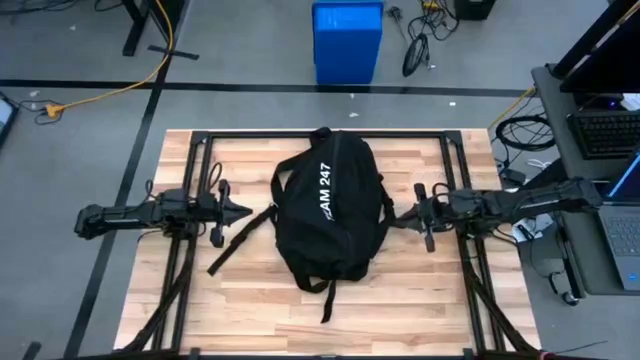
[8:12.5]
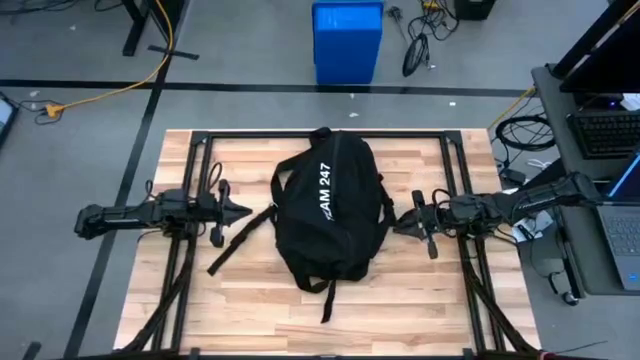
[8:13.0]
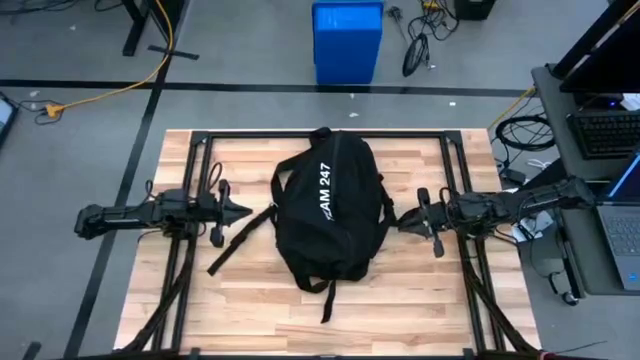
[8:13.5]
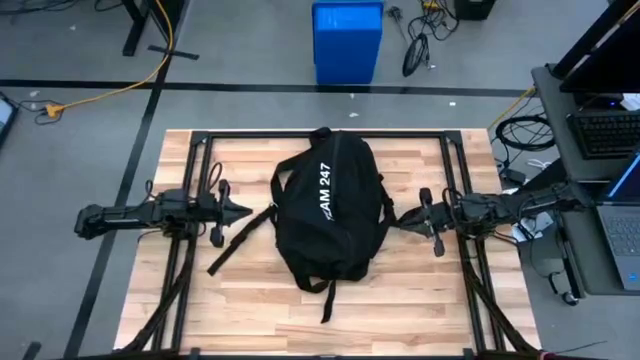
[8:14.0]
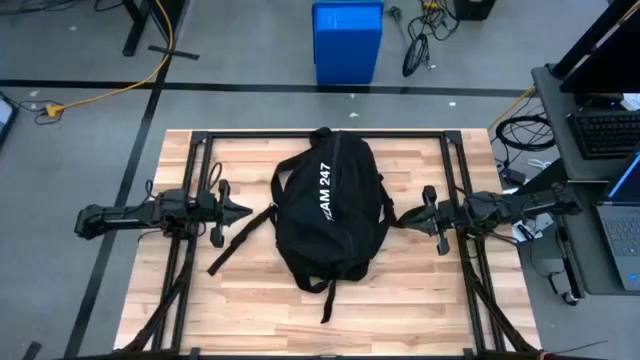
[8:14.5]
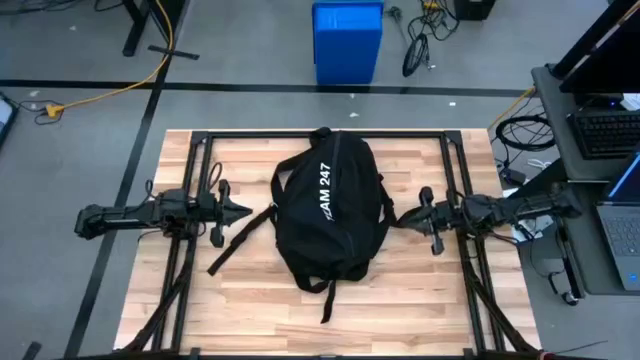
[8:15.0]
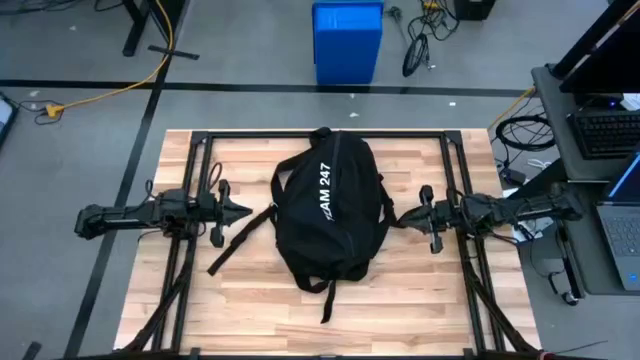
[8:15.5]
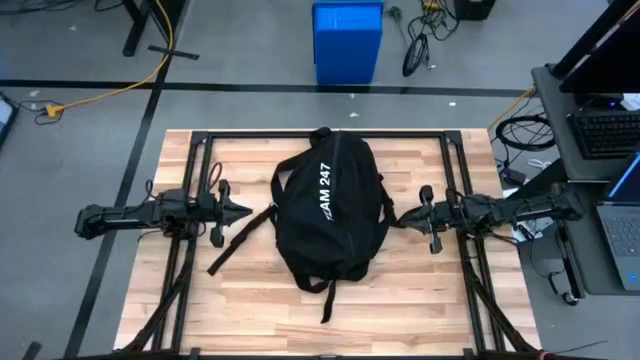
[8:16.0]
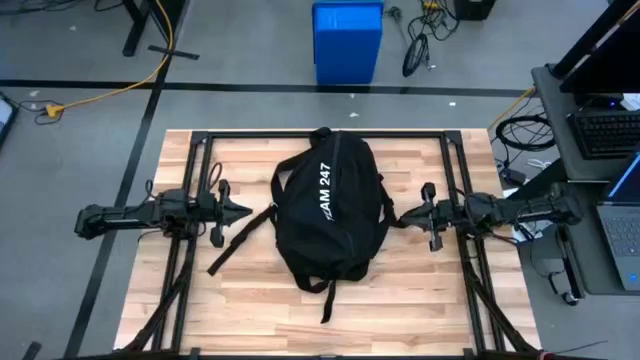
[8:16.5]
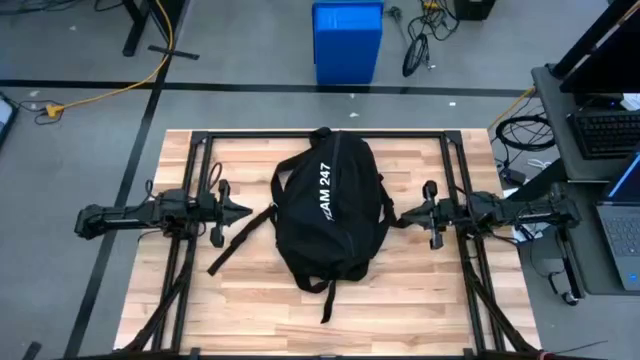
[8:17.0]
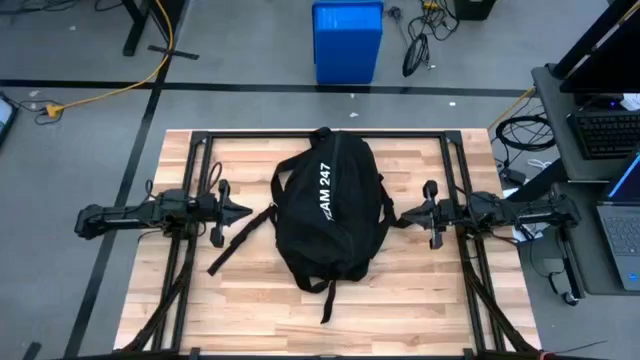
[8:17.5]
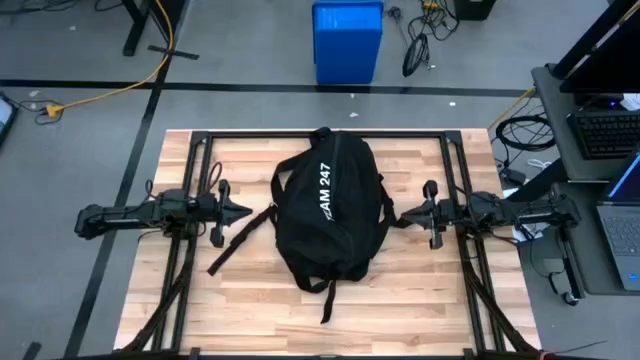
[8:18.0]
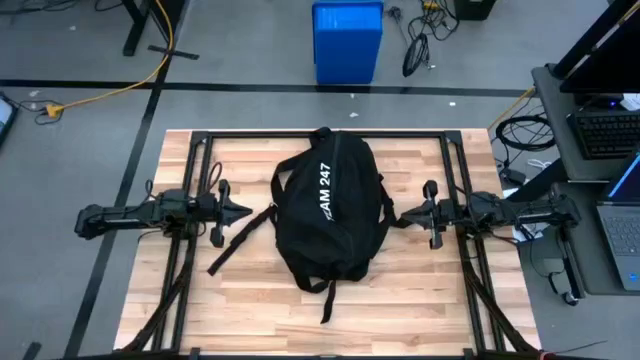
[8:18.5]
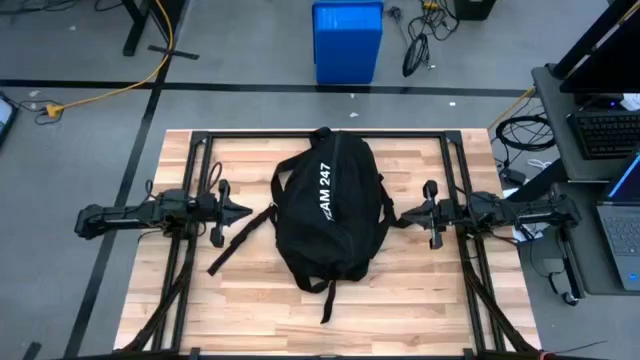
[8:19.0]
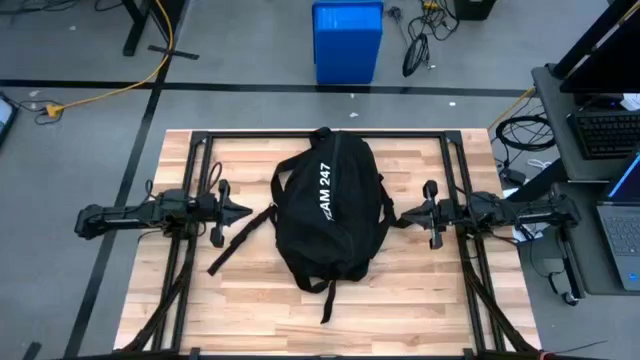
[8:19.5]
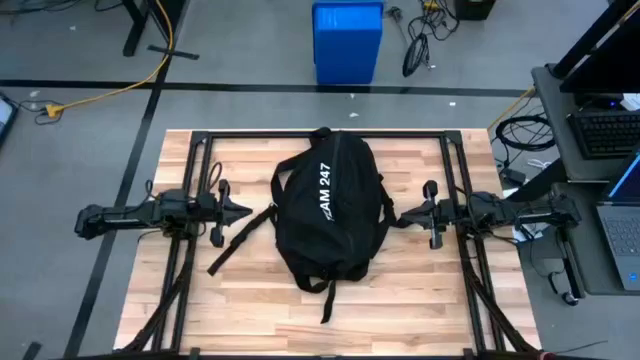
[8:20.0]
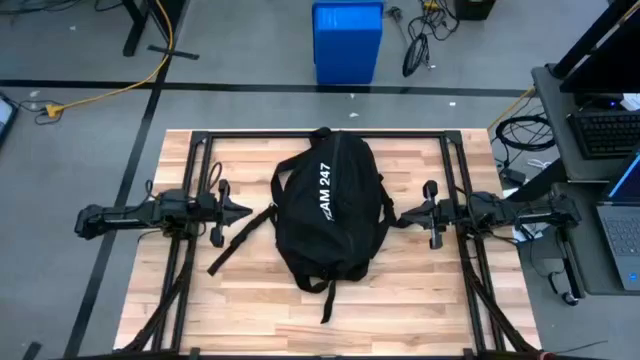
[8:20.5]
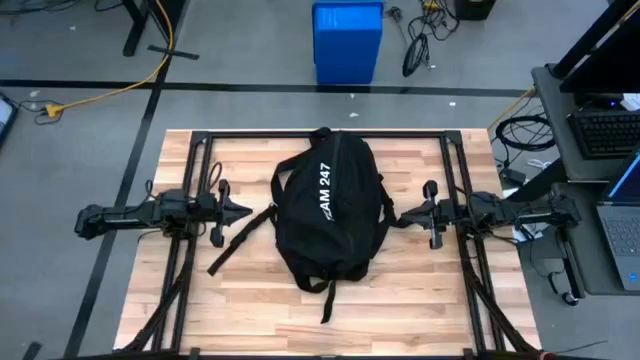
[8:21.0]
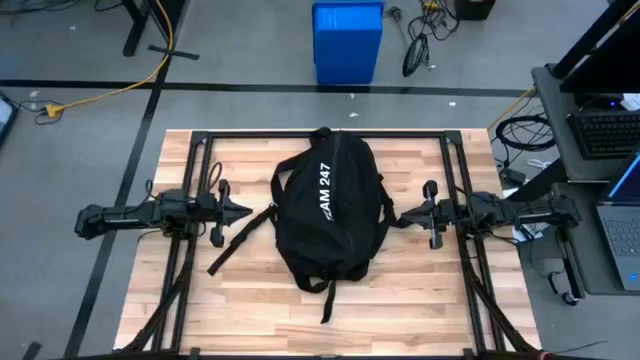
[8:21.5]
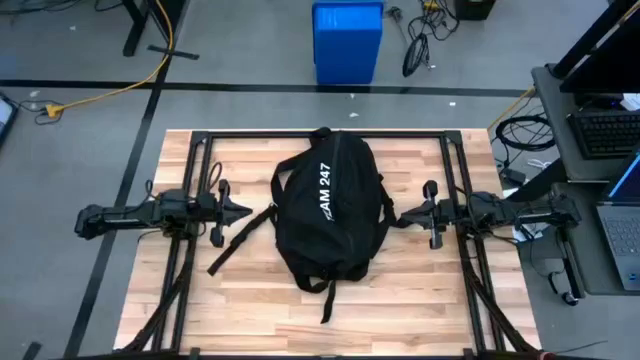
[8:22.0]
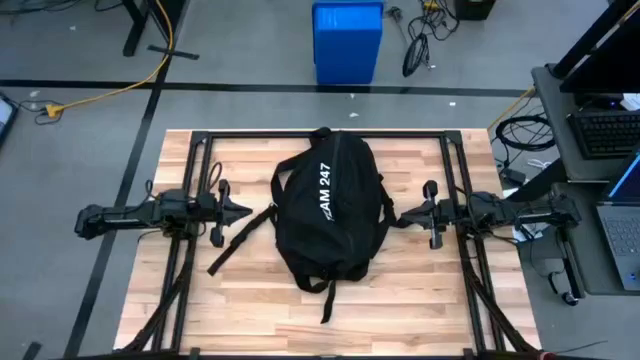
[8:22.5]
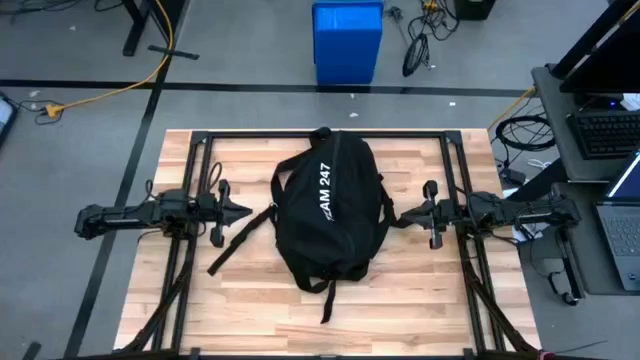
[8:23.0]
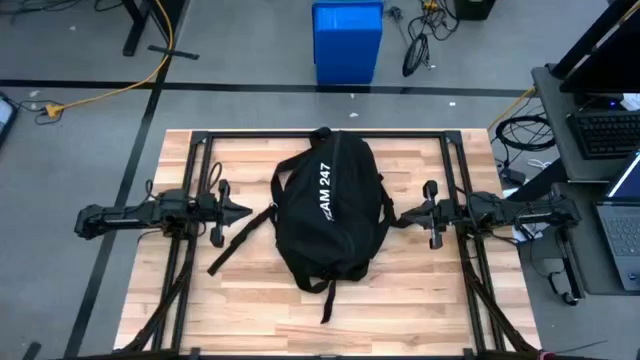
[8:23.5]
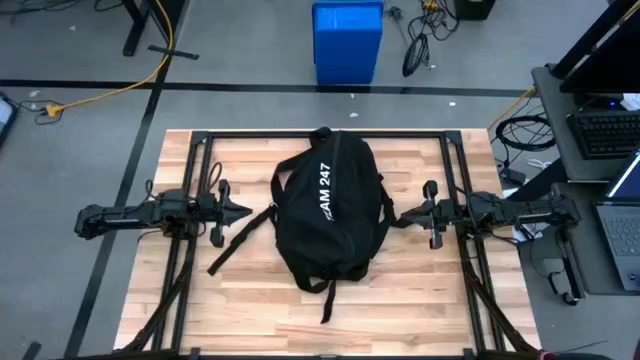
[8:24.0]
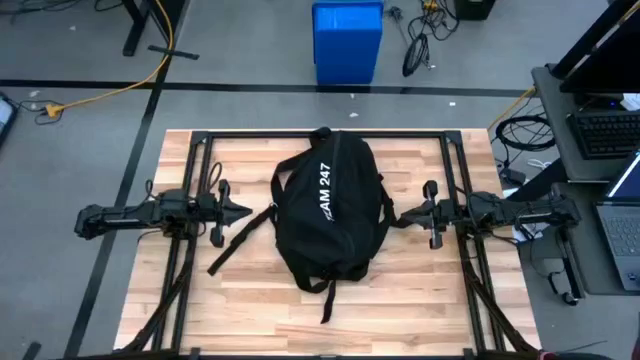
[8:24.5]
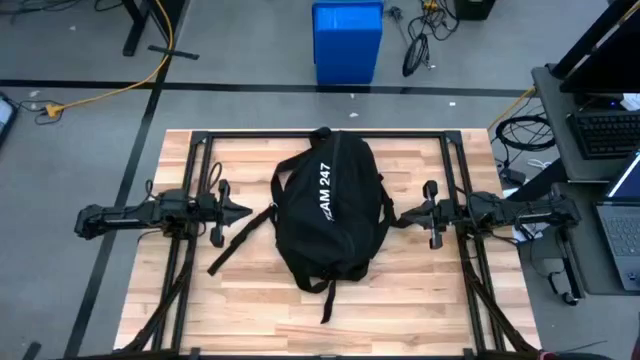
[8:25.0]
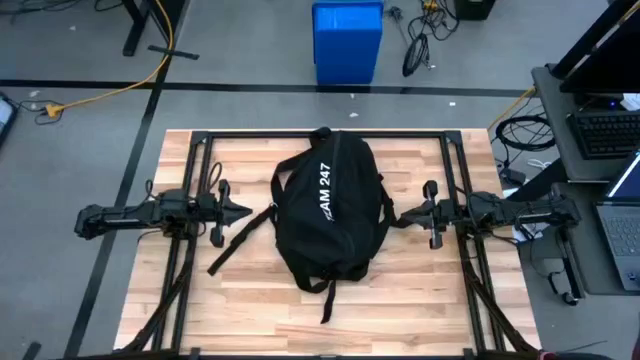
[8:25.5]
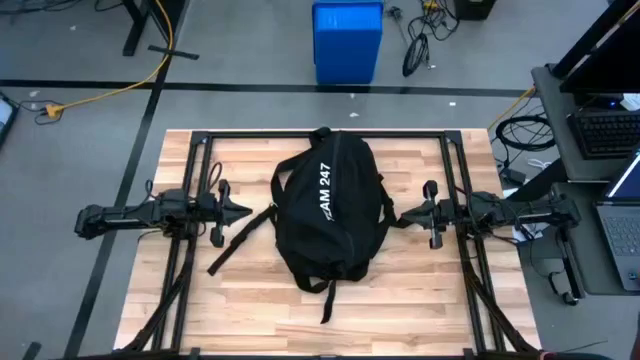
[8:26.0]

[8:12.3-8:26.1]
Task: Unpack backpack
Return to Home Position

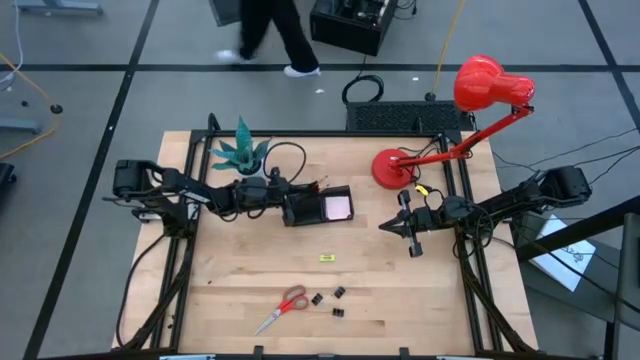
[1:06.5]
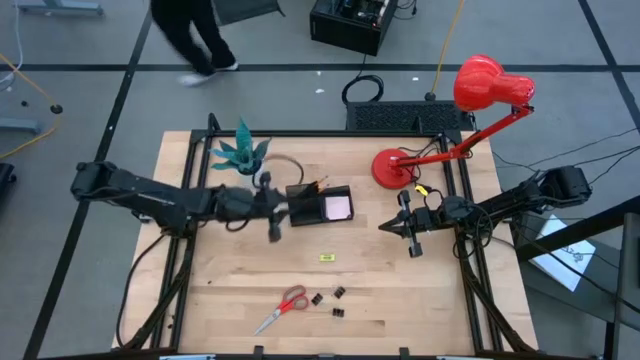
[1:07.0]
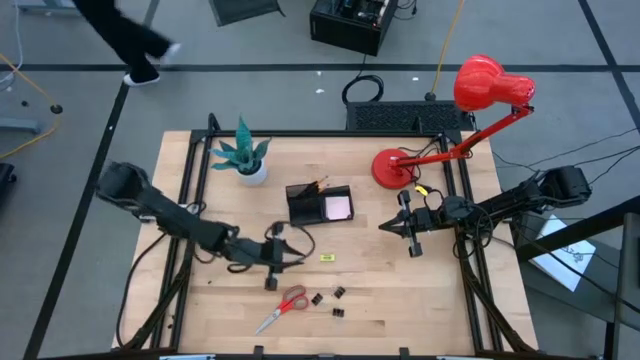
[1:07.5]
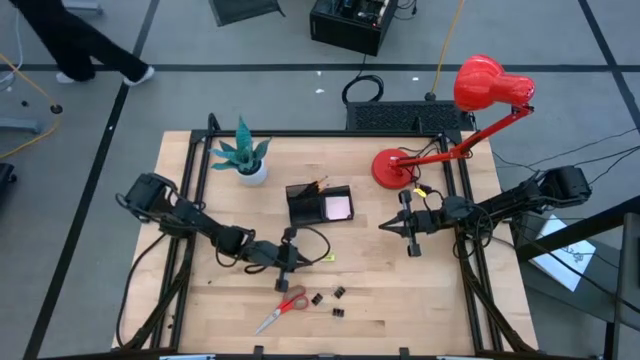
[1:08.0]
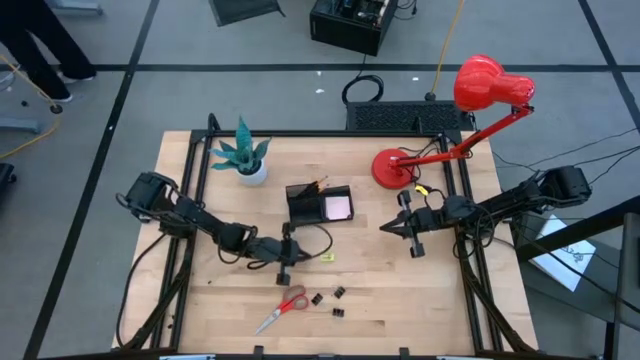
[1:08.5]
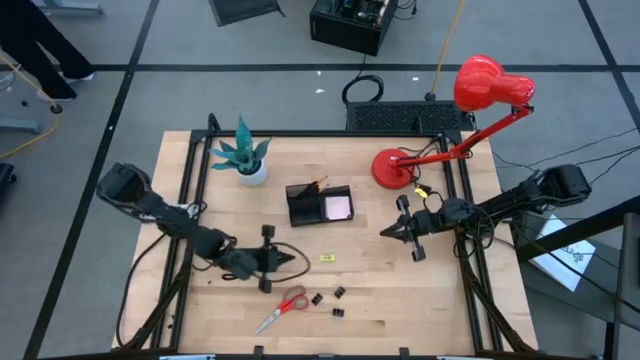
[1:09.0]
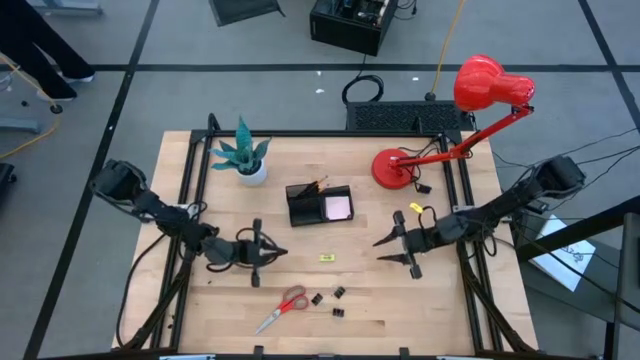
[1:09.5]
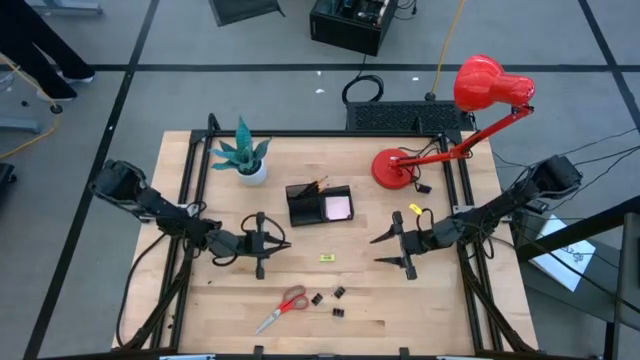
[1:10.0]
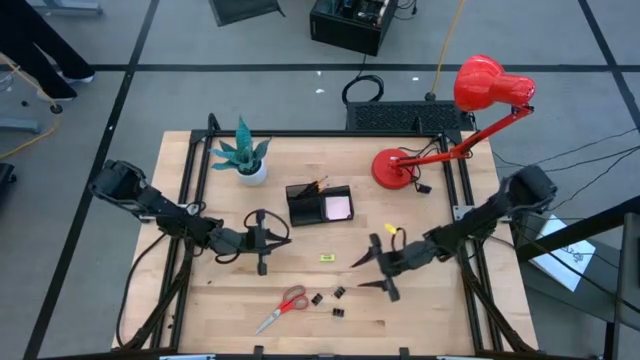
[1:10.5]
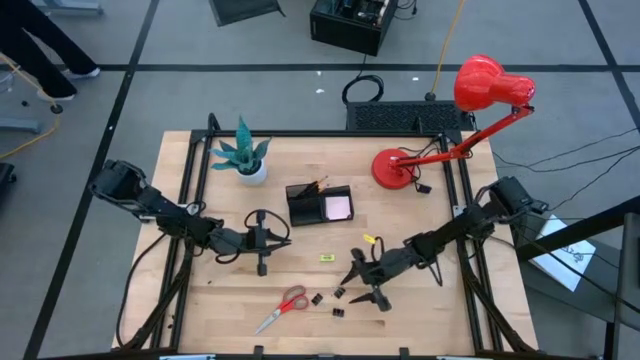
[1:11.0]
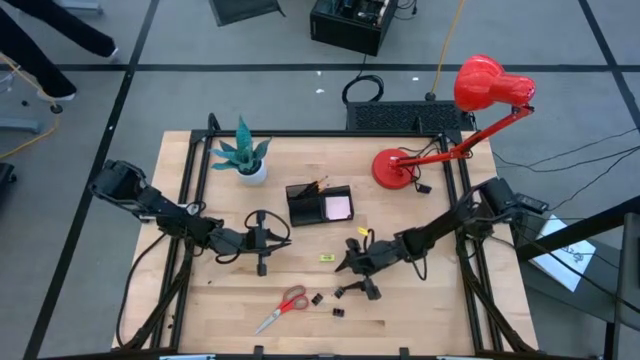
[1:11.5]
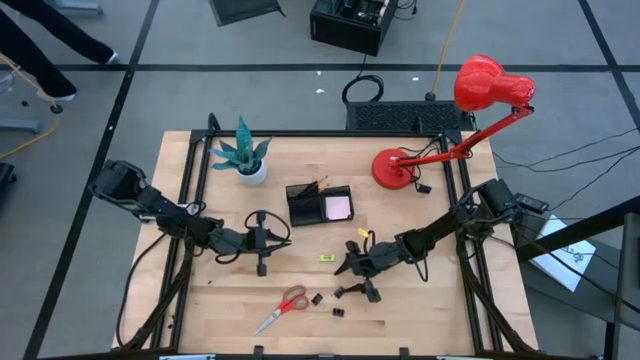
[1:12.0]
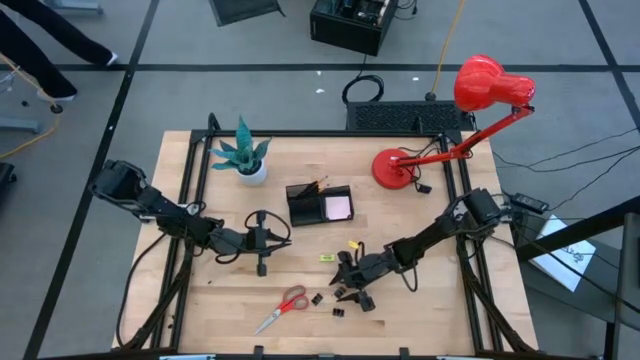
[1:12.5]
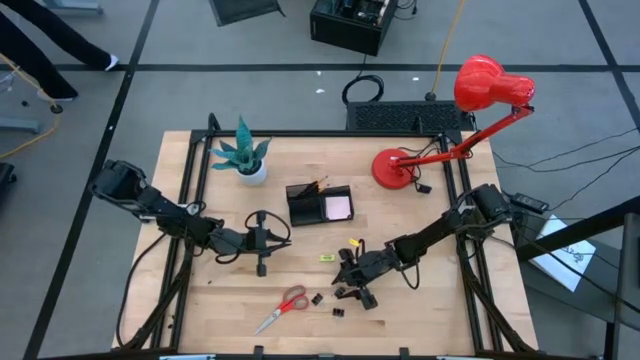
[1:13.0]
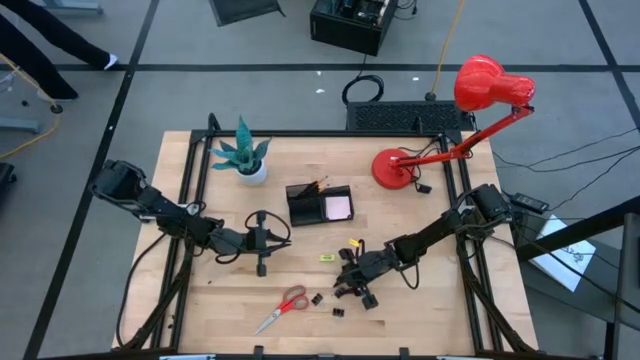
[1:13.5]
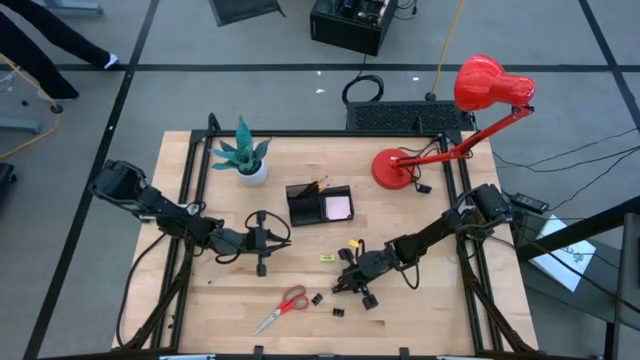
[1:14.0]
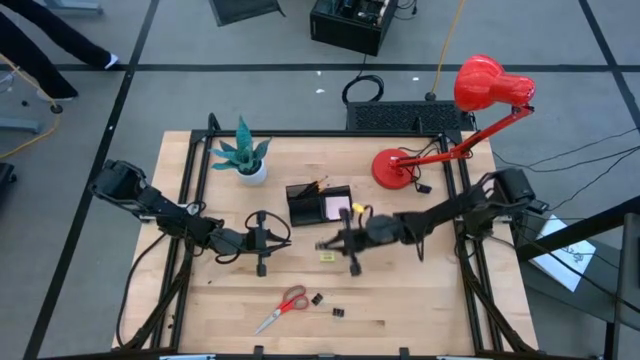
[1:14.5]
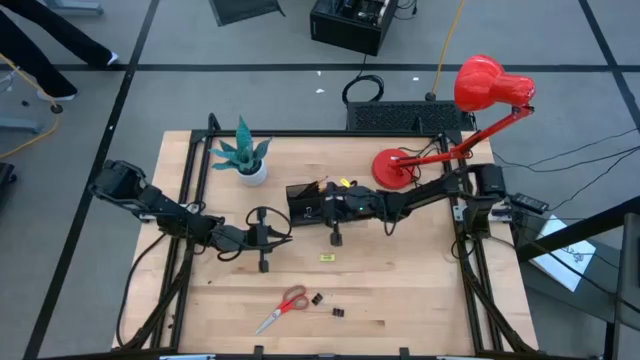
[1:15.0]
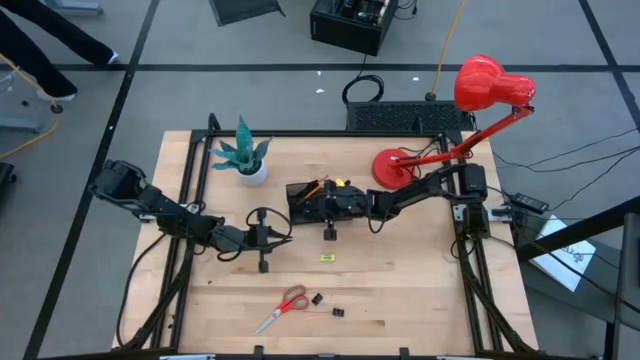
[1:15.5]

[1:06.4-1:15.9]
Task: Pick and place office supplies into organizer
Put the black binder clip into the black desk organizer
